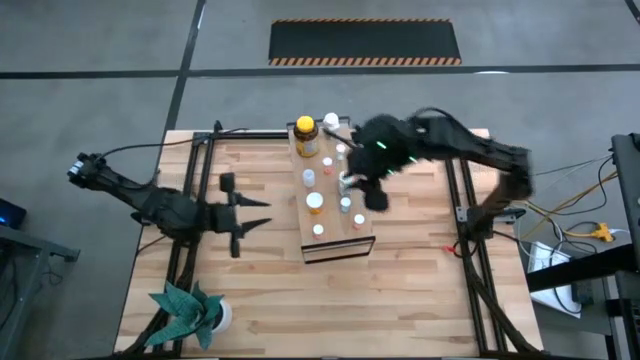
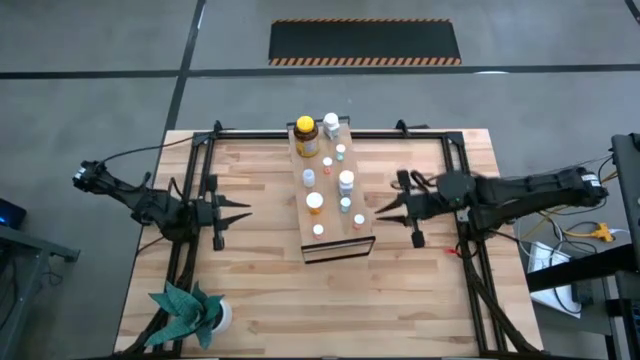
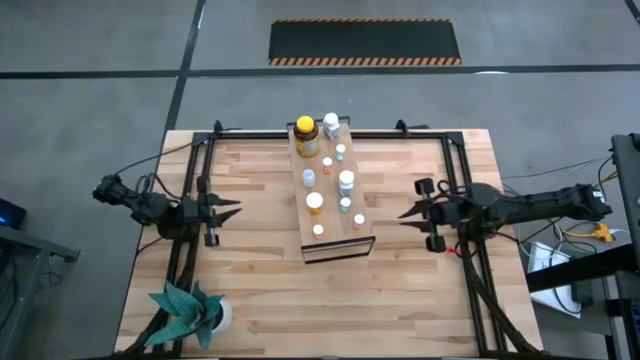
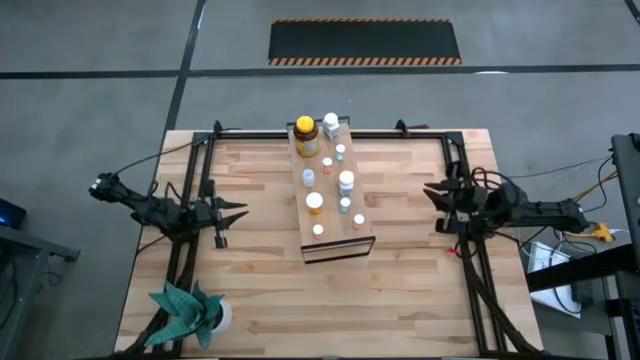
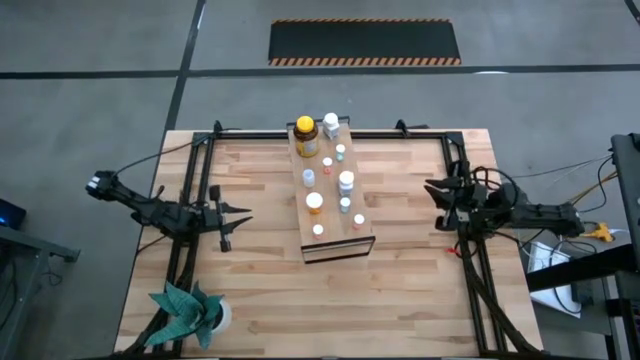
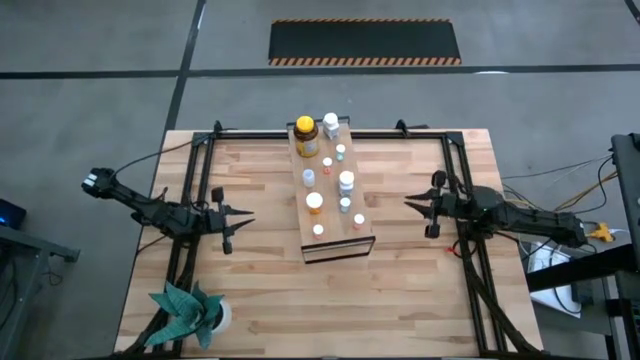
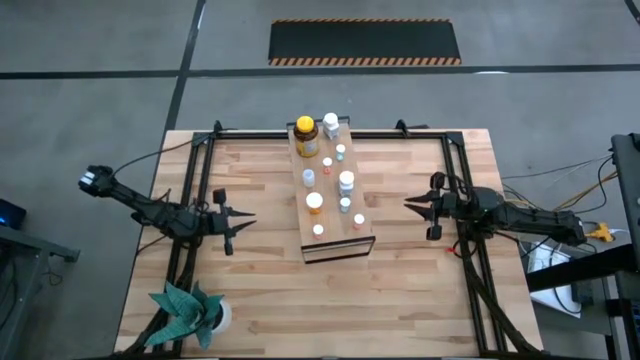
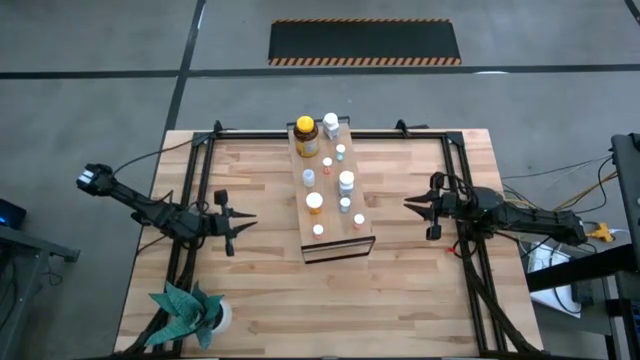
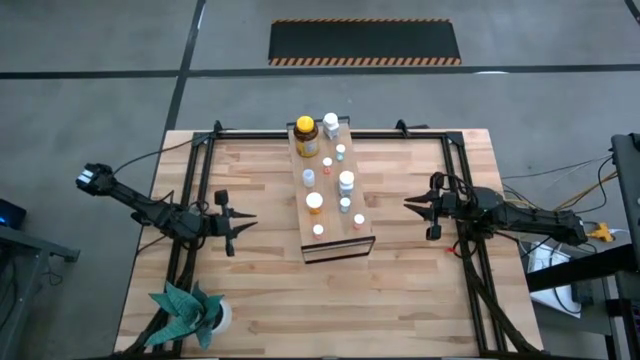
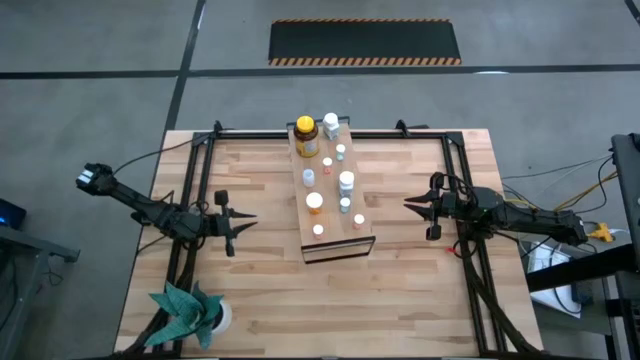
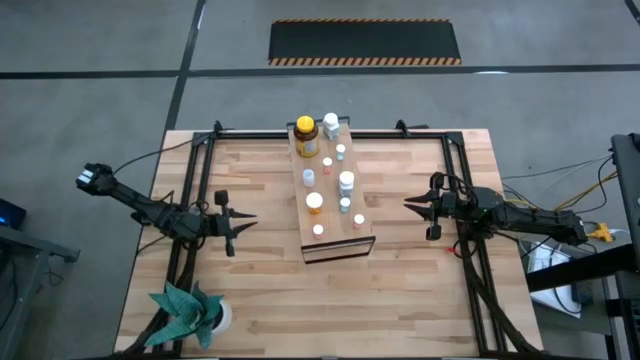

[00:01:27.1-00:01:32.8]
Task: Pick and place medicine bottles onto shelf by color
Return to Home Position

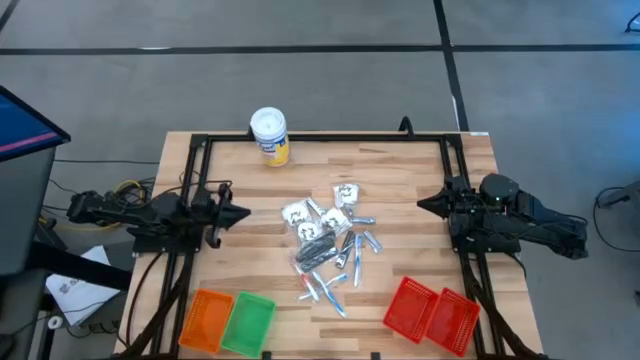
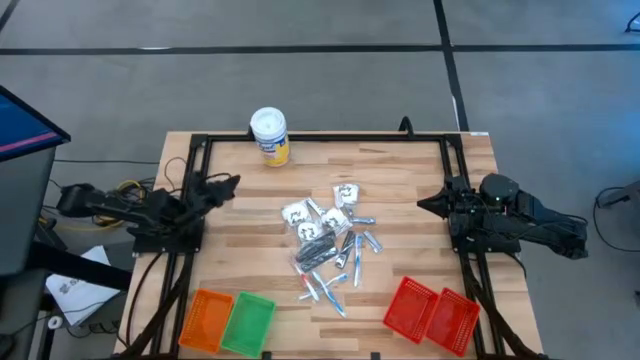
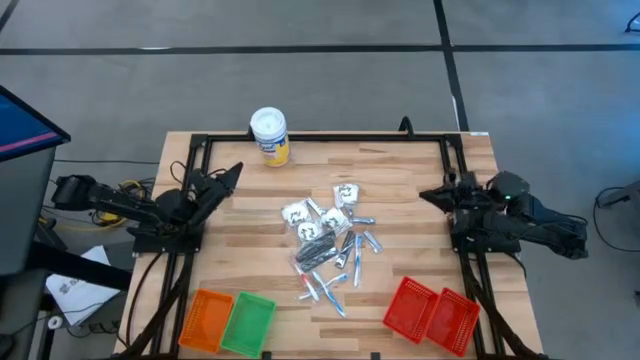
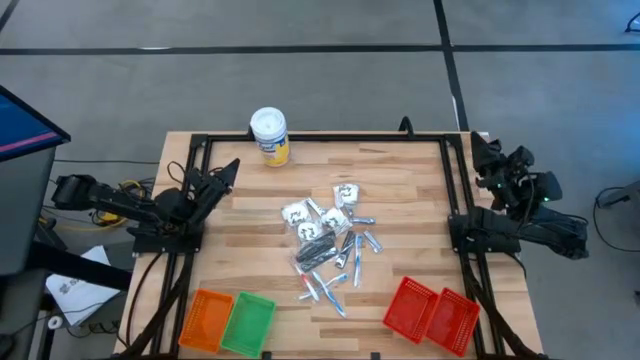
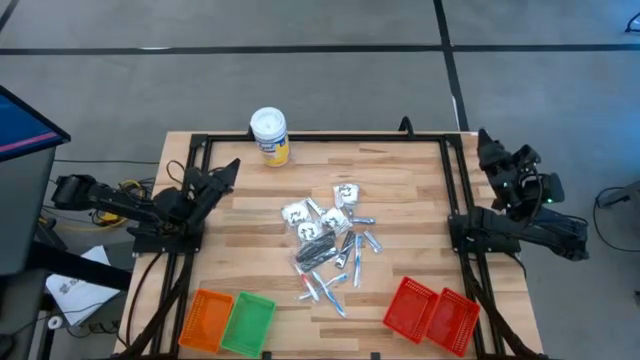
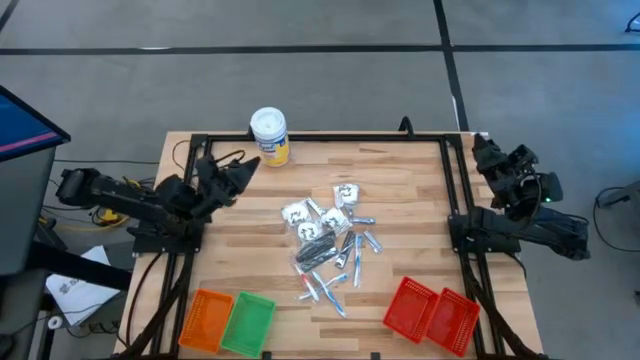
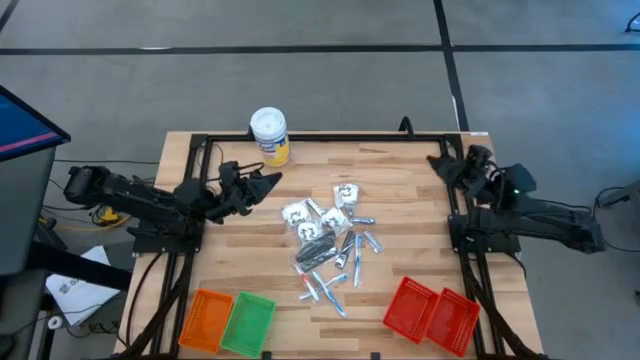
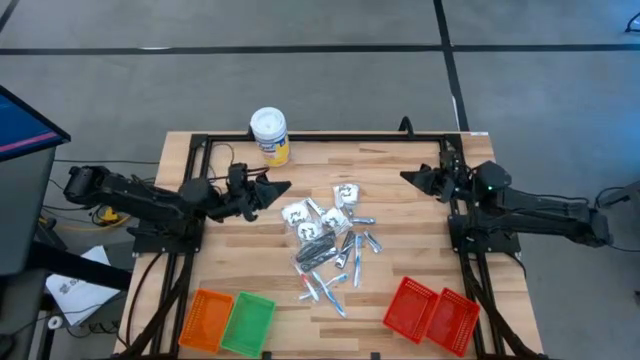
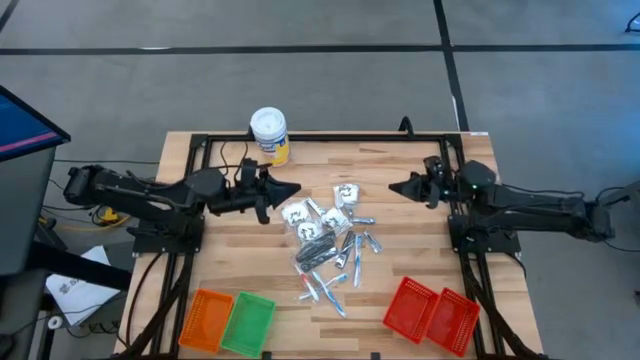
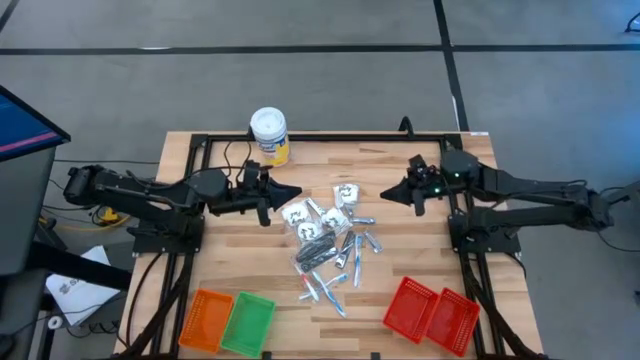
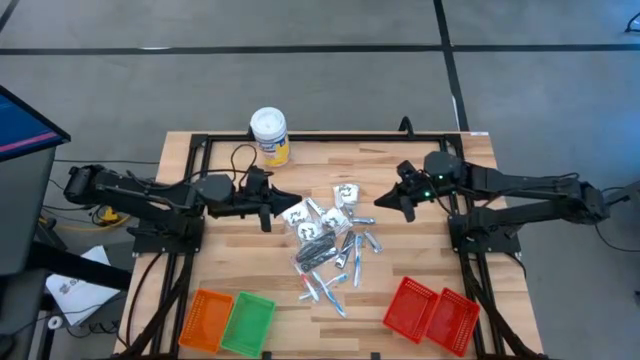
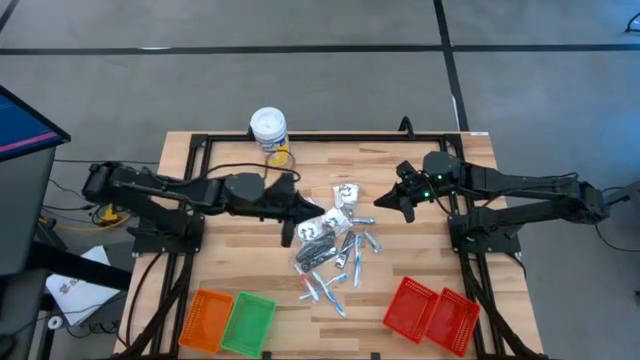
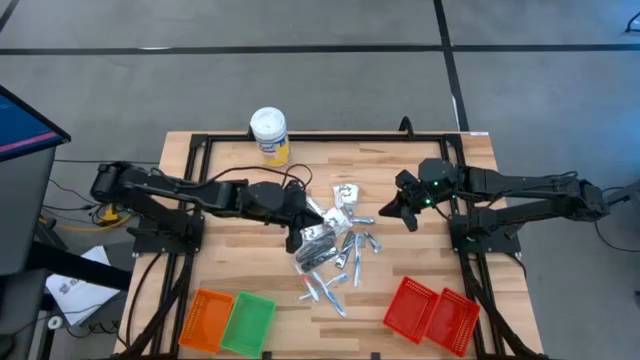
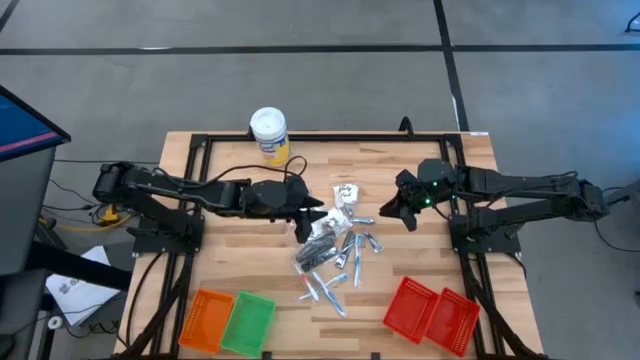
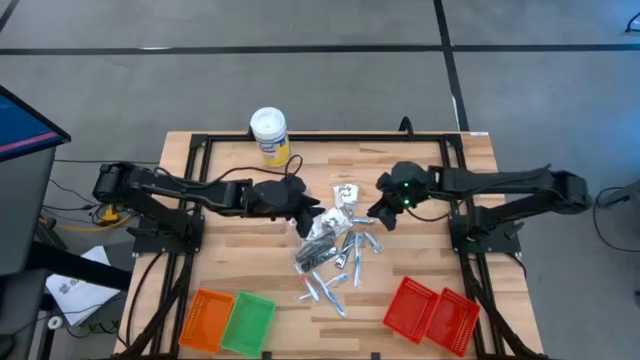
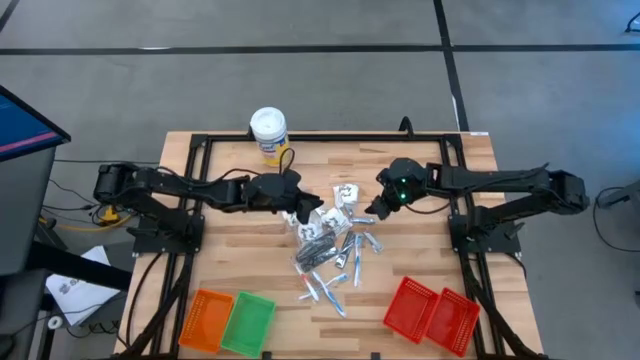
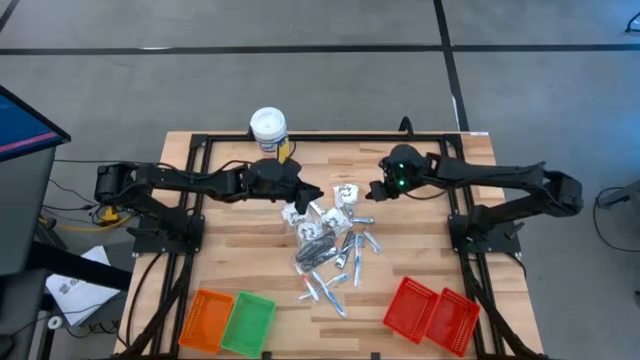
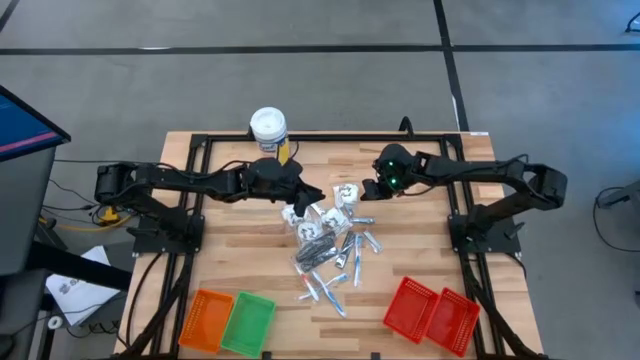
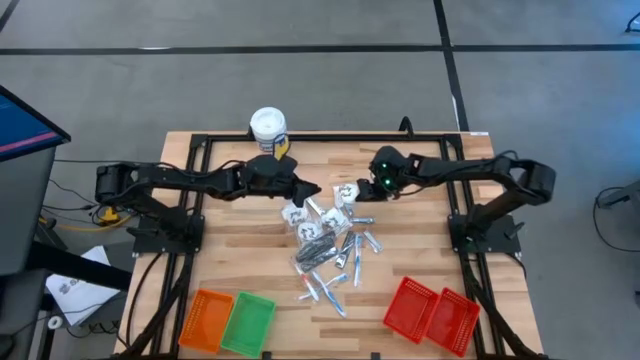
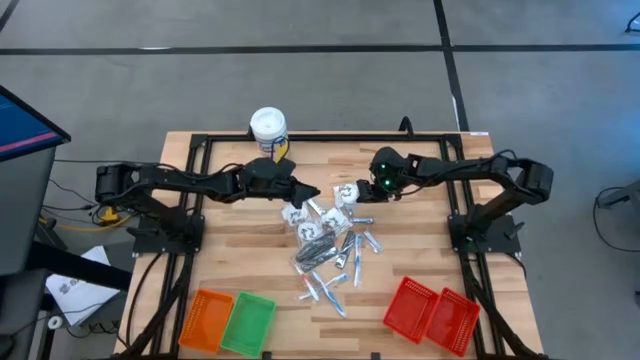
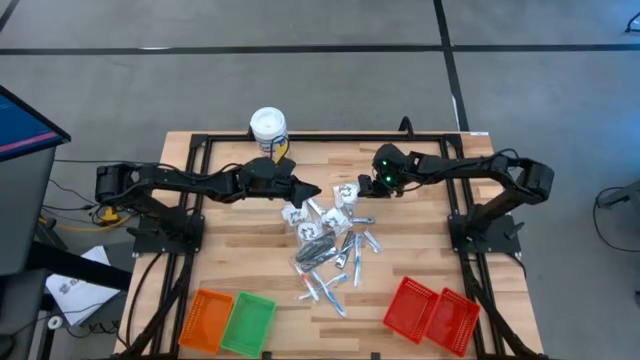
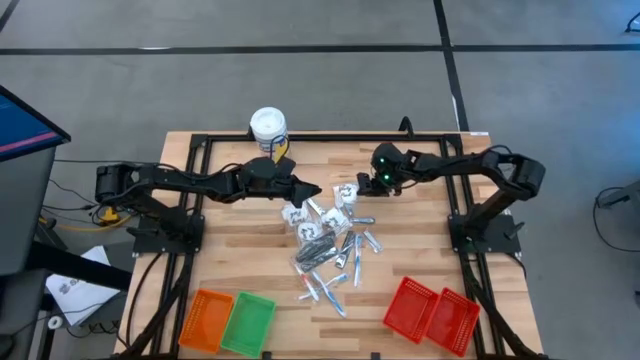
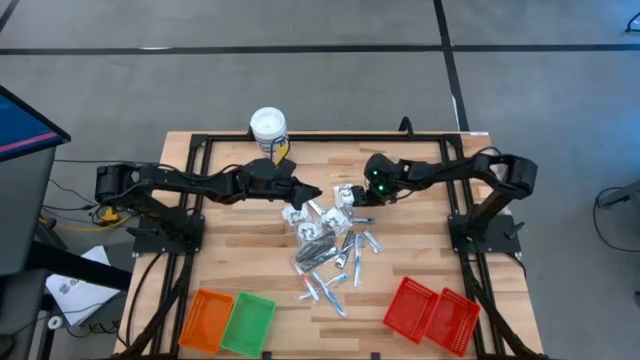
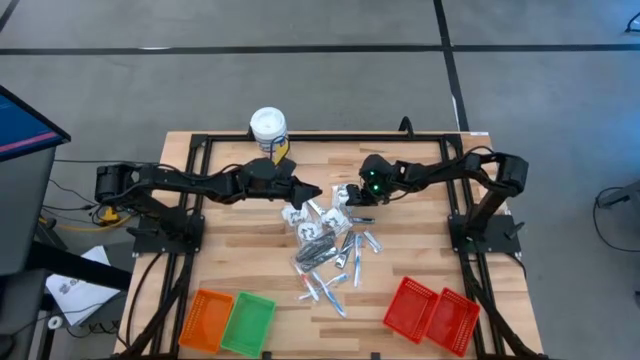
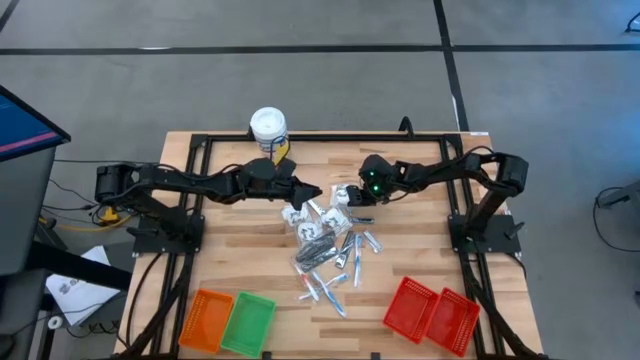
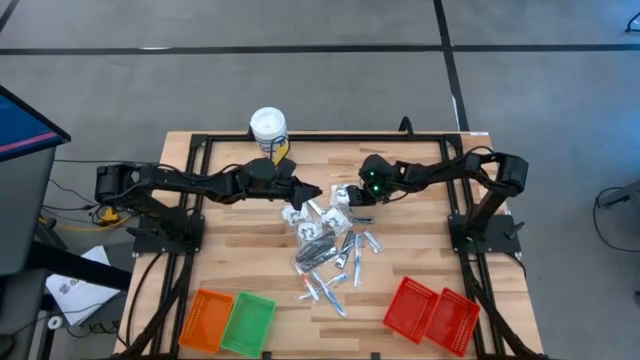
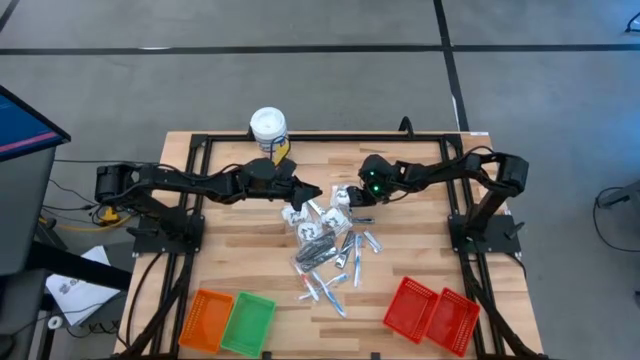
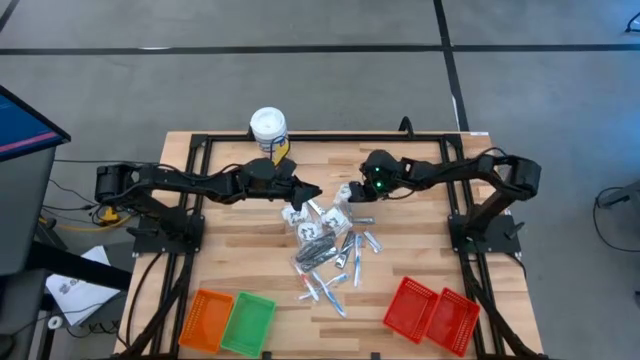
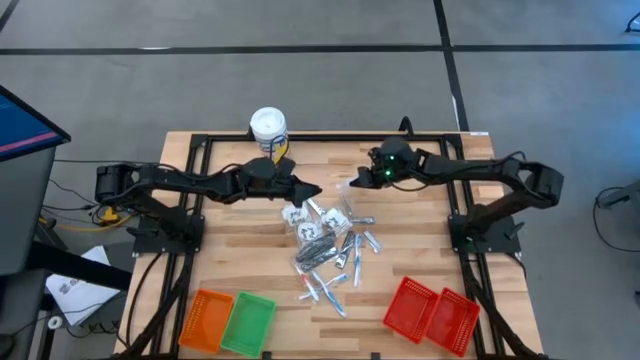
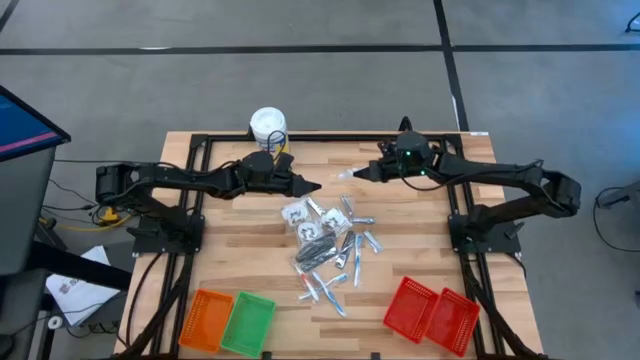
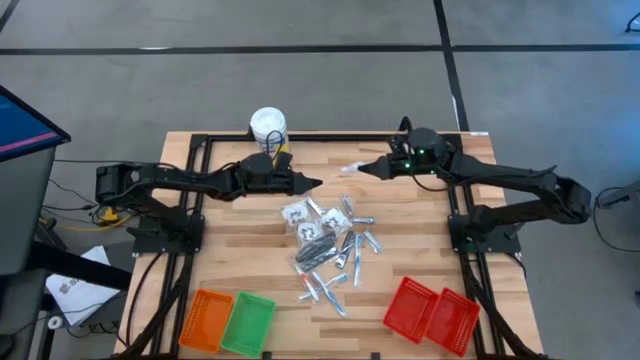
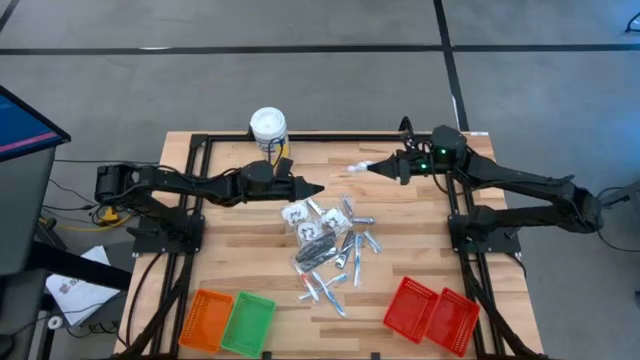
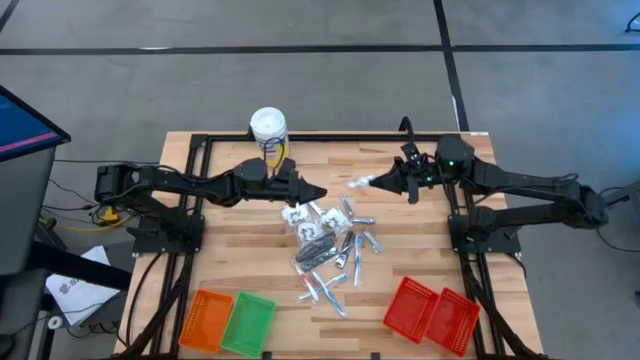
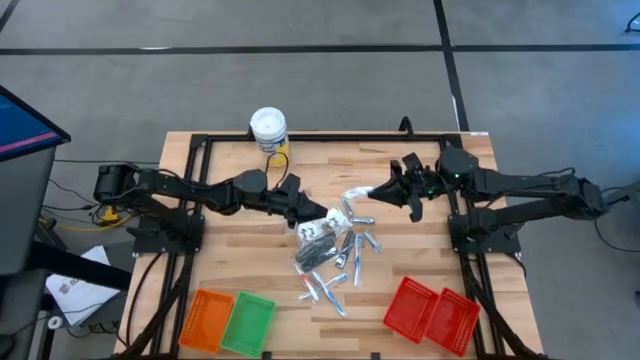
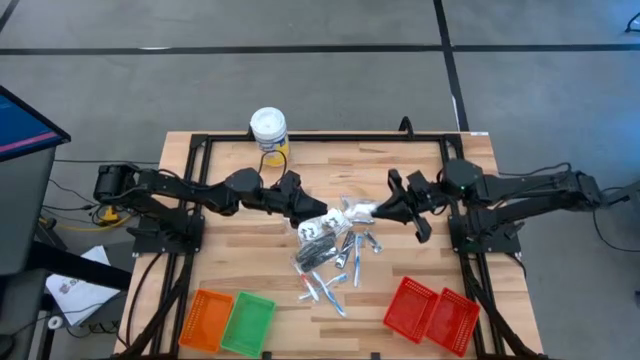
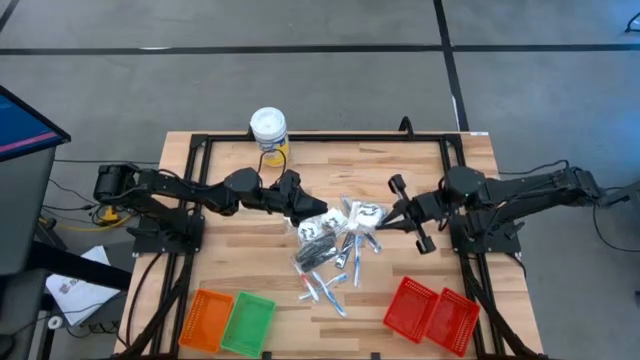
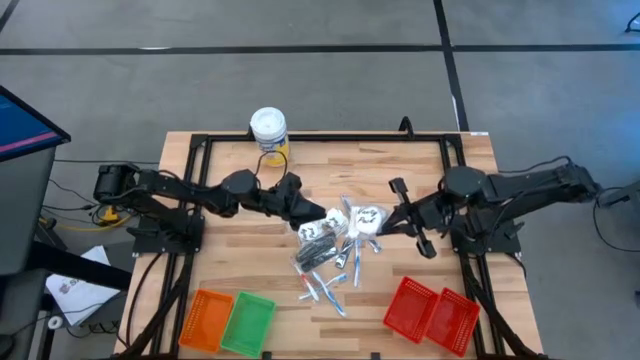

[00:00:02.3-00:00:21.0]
Task: Pick & Place Travel size toiletries
Put the cotton pods into the left red basket
